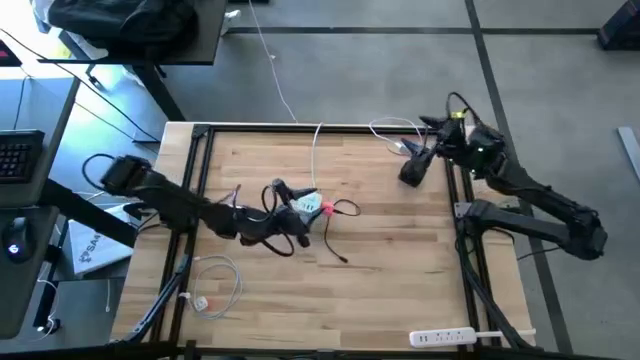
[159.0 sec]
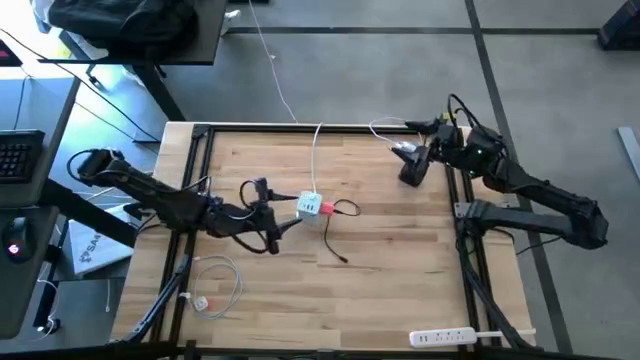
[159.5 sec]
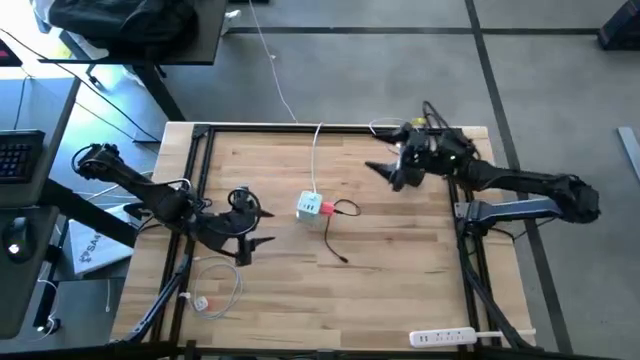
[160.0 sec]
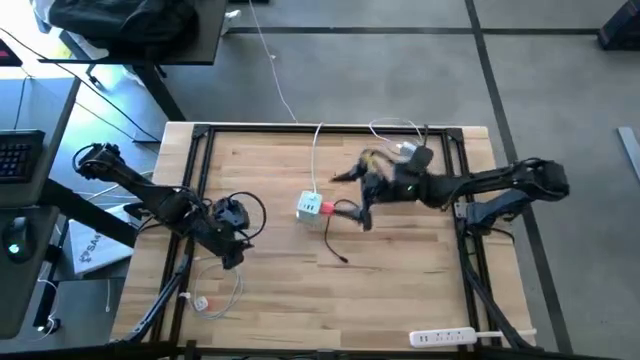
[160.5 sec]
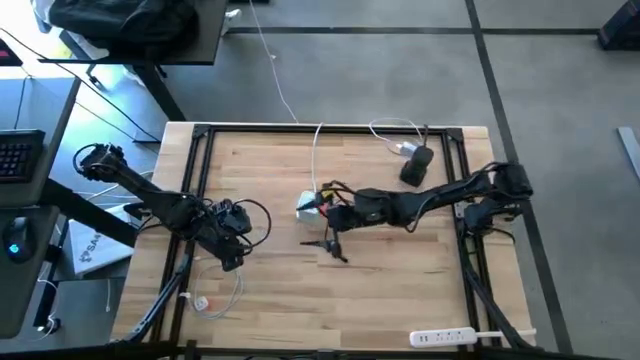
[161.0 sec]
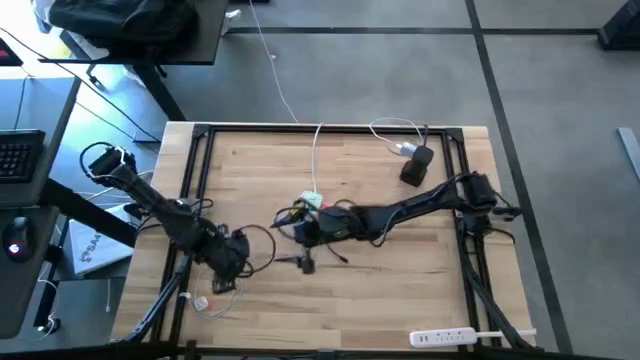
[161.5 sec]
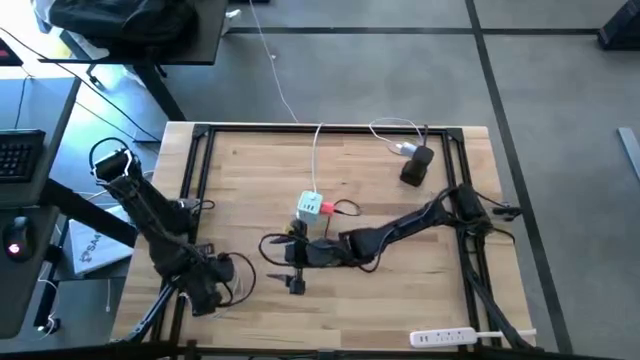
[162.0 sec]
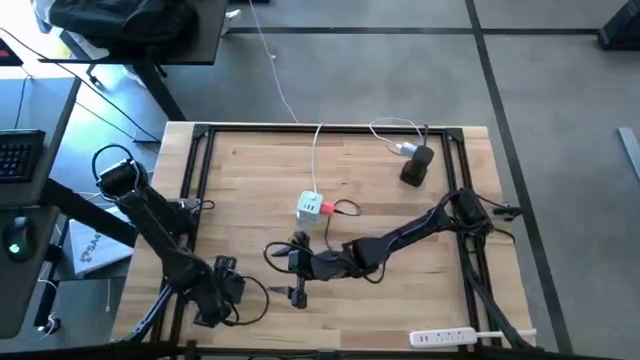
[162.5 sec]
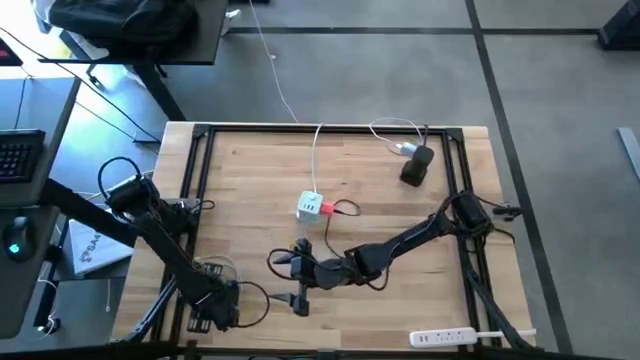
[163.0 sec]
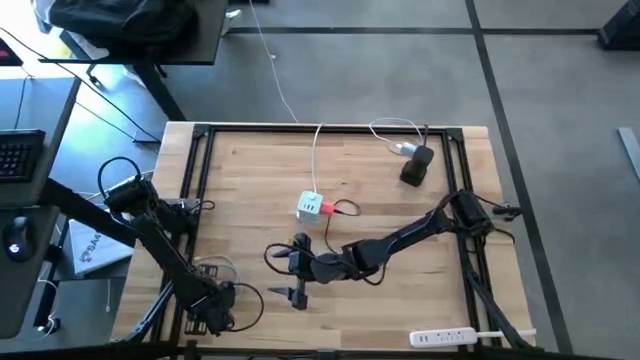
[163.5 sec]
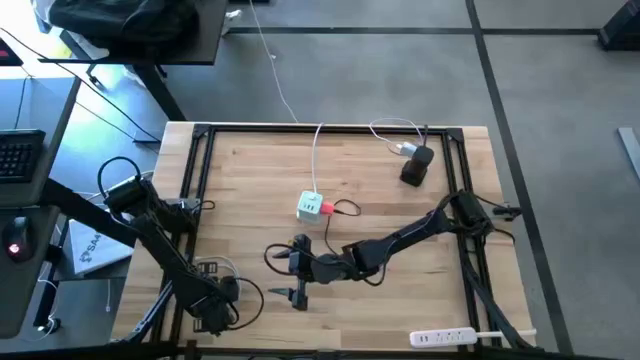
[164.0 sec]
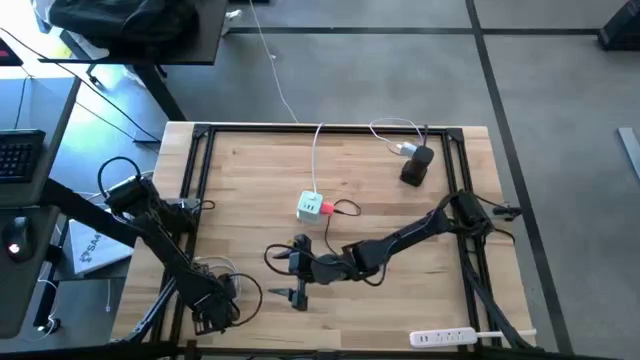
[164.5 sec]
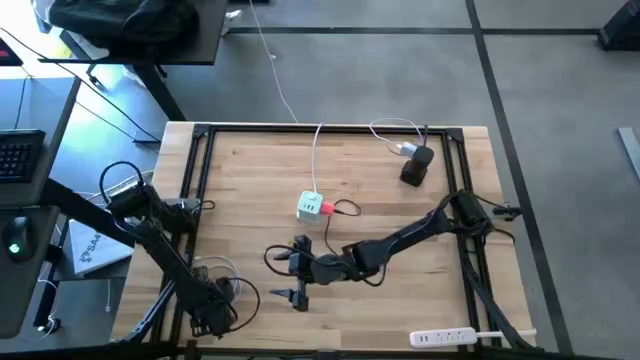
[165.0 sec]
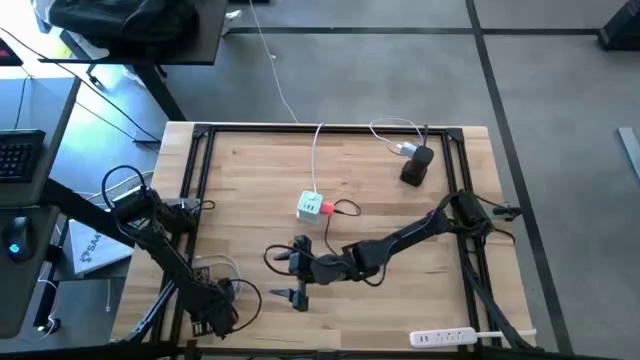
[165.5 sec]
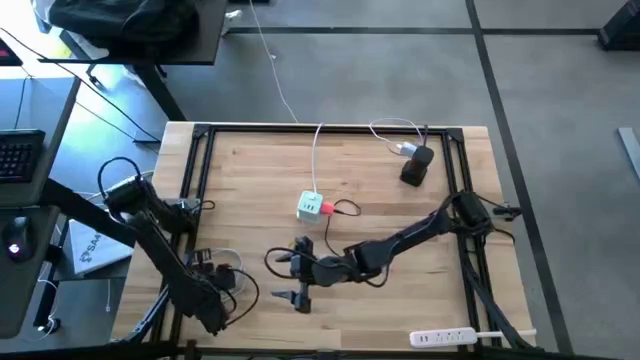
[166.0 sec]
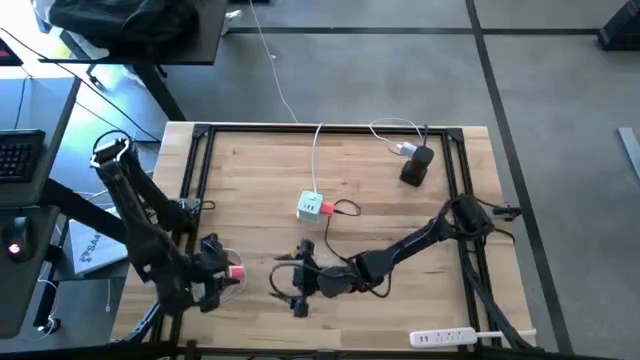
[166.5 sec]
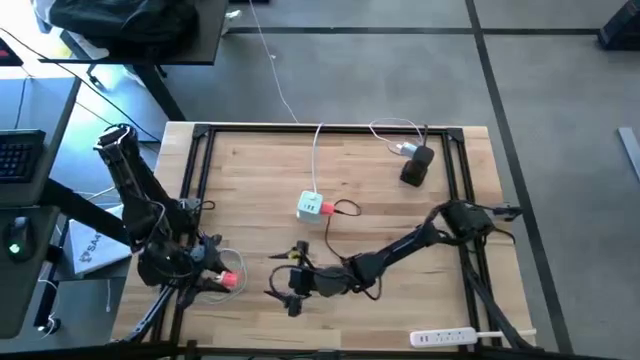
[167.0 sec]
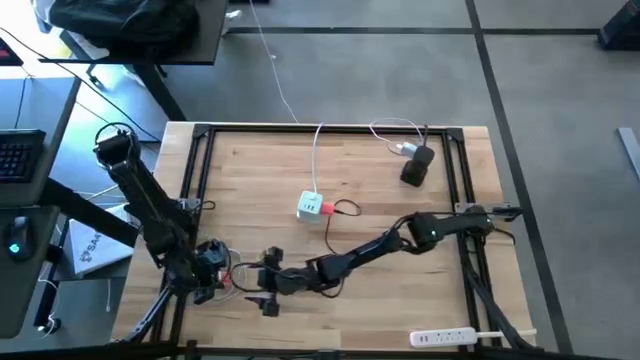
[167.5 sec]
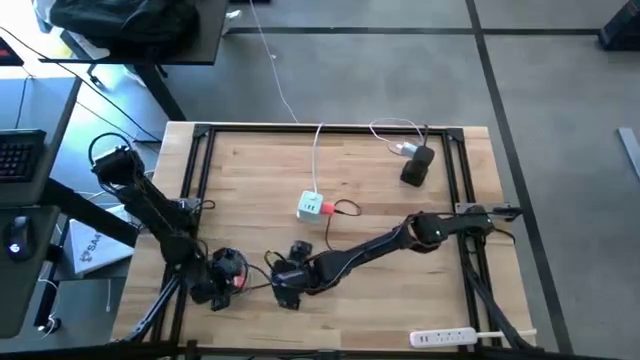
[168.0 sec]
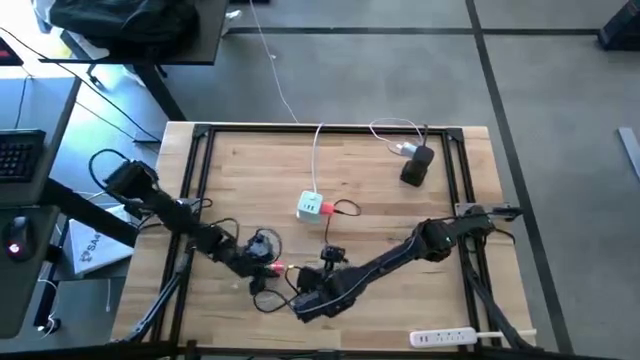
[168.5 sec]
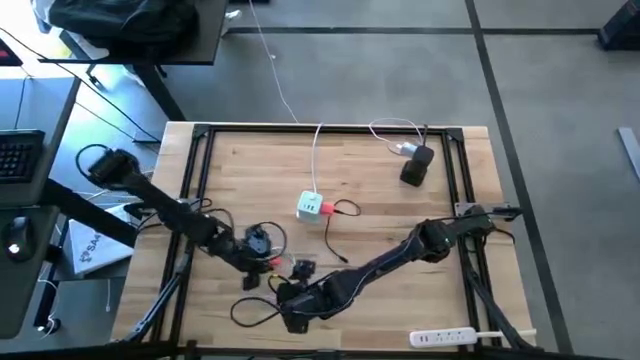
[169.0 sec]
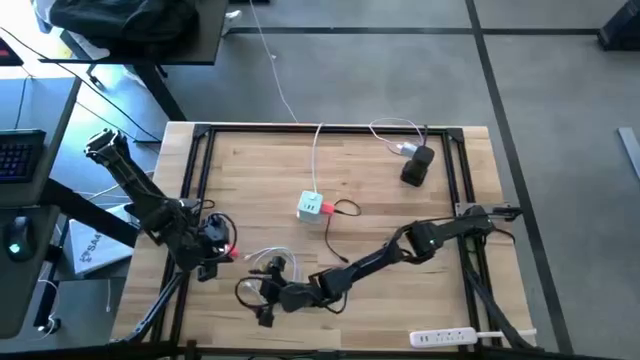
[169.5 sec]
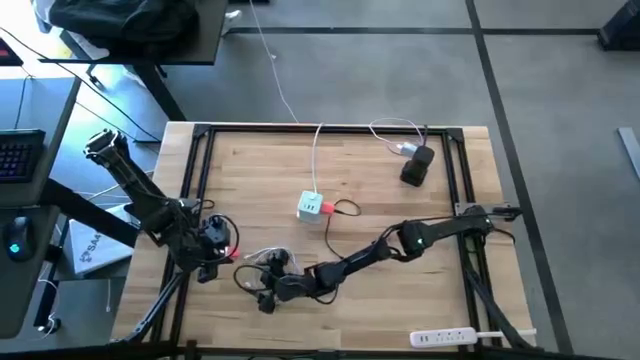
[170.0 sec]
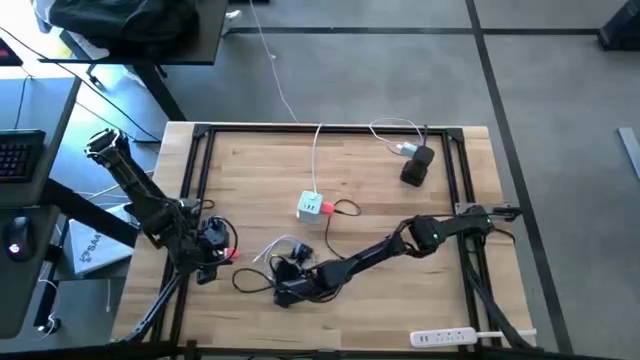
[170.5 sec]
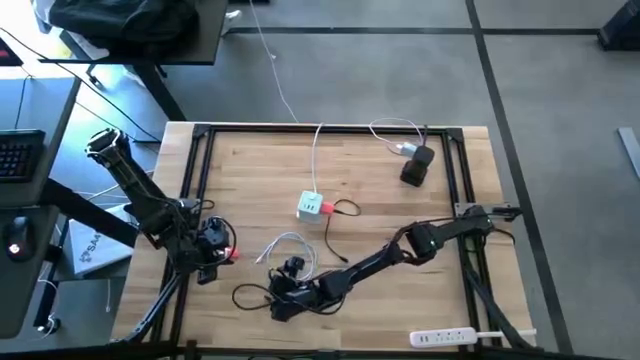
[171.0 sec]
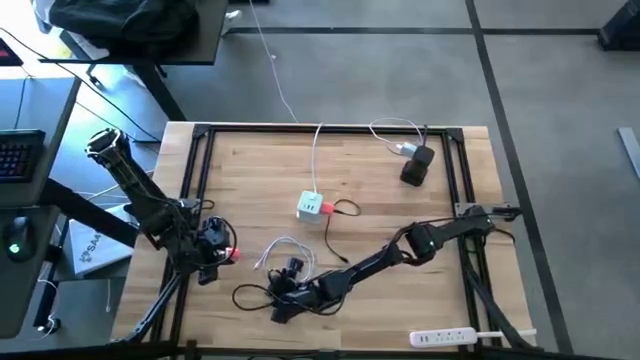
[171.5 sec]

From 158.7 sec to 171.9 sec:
Task: Insert USB
Insert the white charger cable into the pink charger adapter

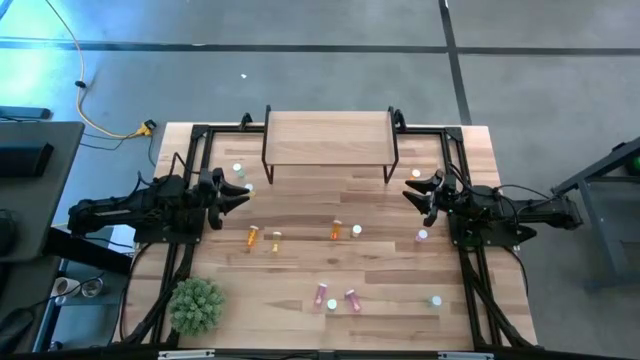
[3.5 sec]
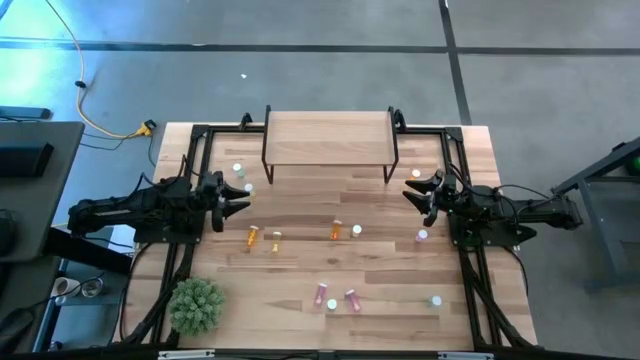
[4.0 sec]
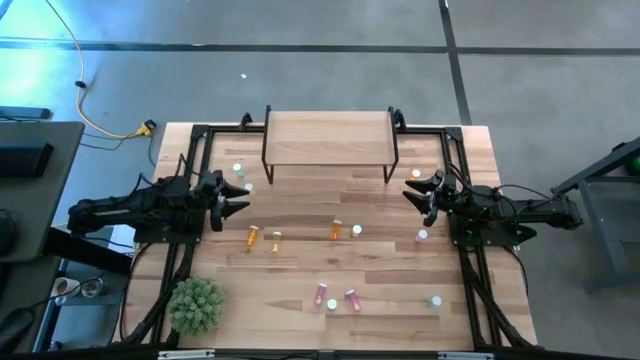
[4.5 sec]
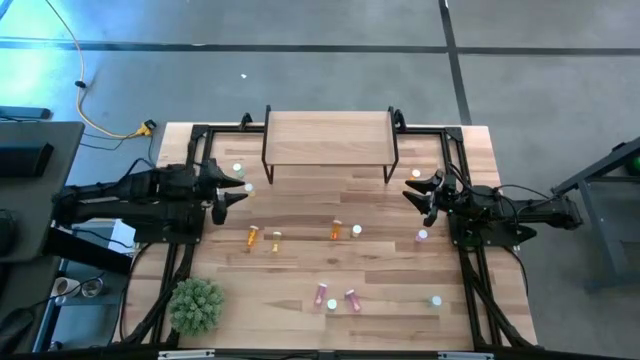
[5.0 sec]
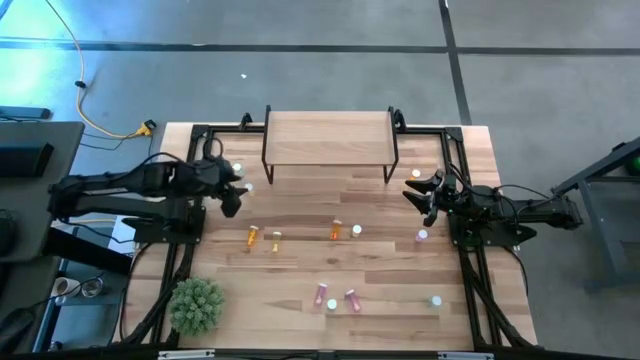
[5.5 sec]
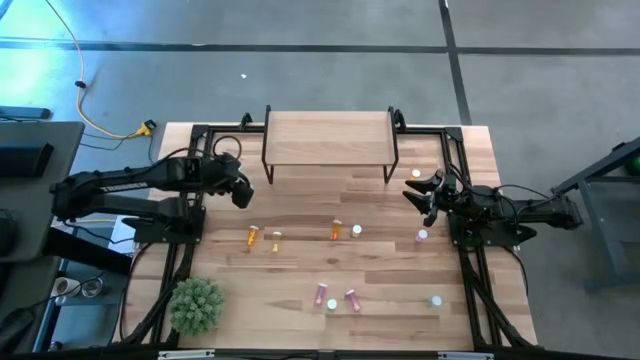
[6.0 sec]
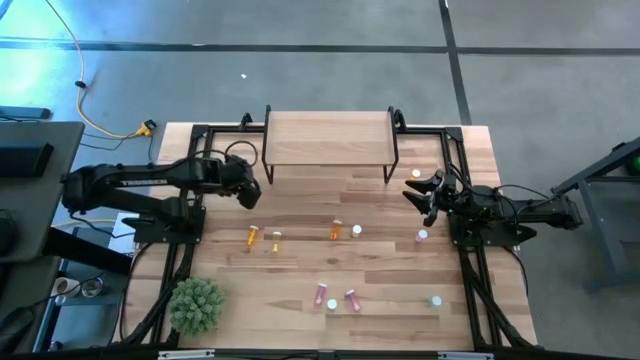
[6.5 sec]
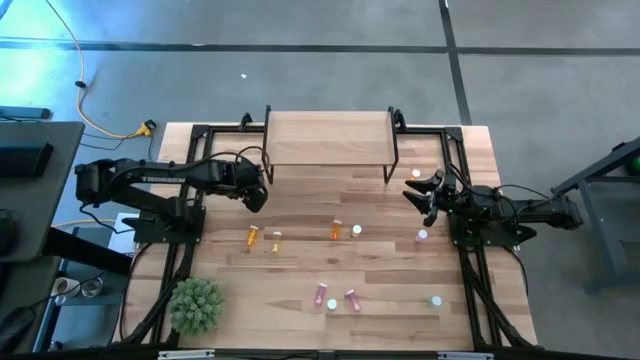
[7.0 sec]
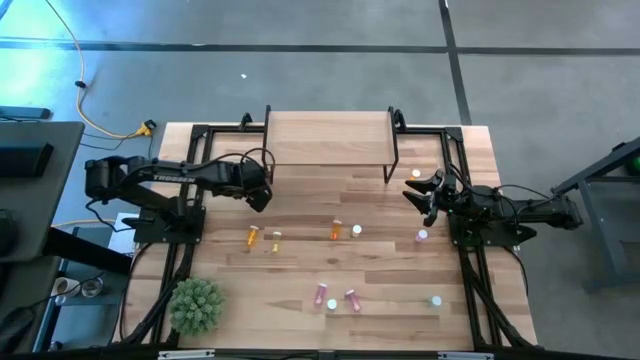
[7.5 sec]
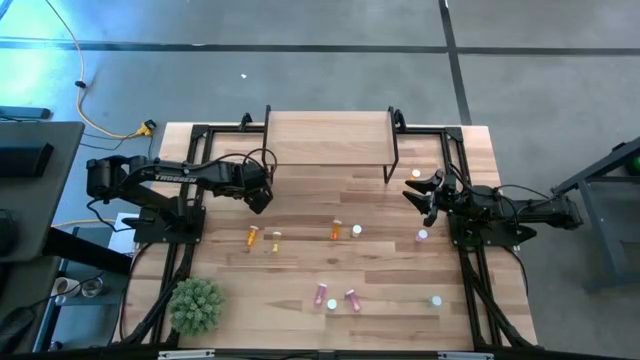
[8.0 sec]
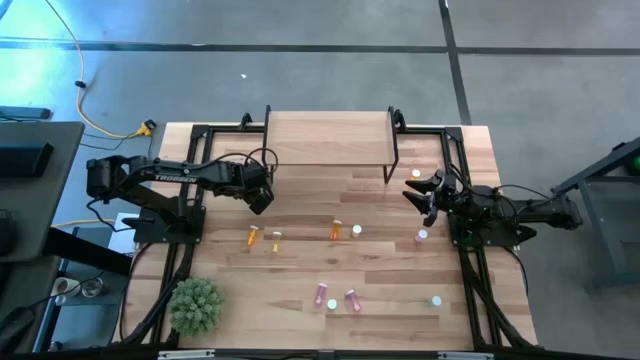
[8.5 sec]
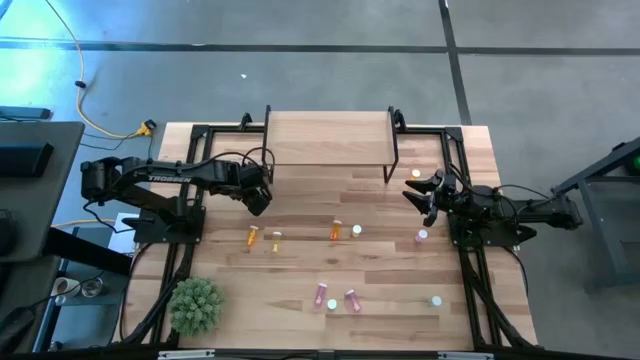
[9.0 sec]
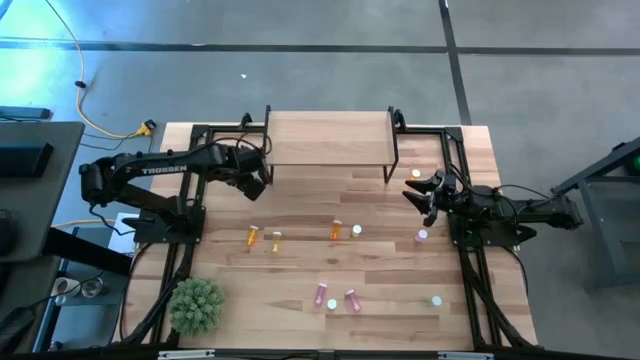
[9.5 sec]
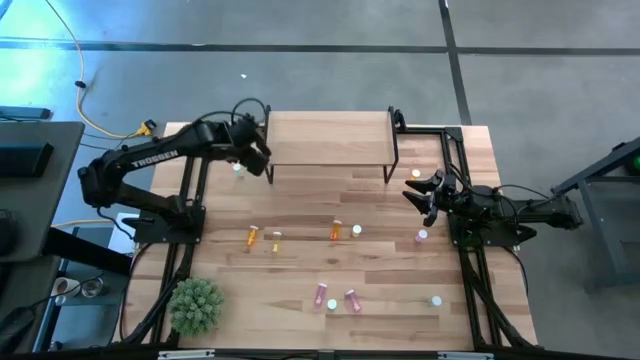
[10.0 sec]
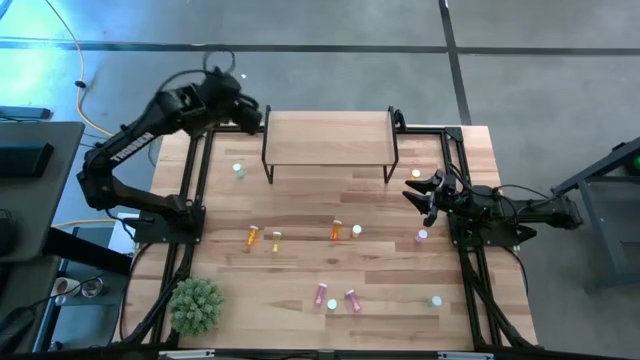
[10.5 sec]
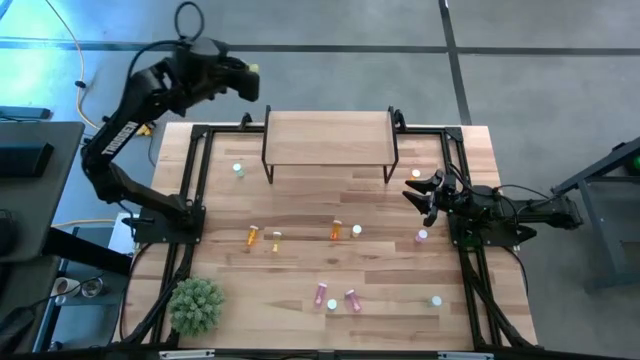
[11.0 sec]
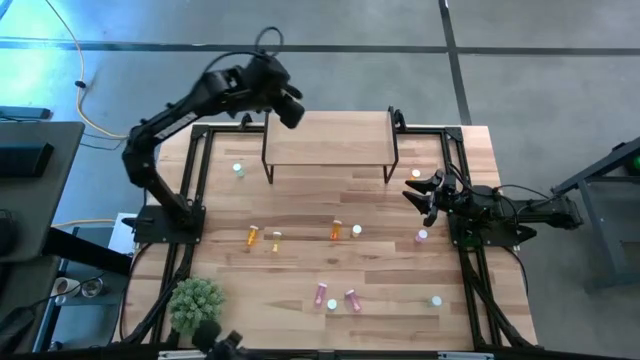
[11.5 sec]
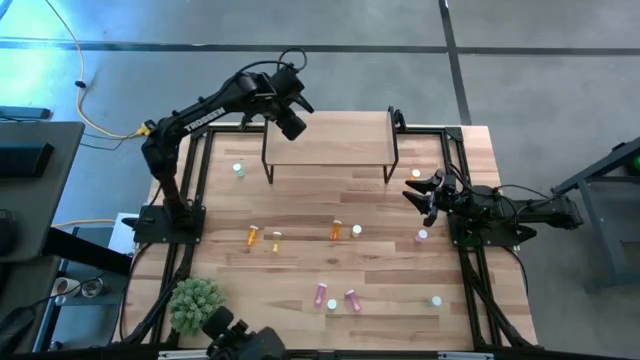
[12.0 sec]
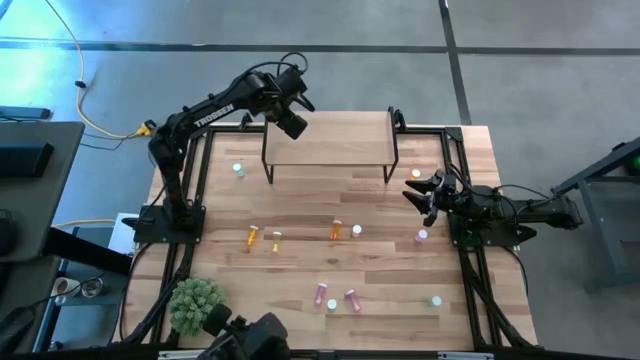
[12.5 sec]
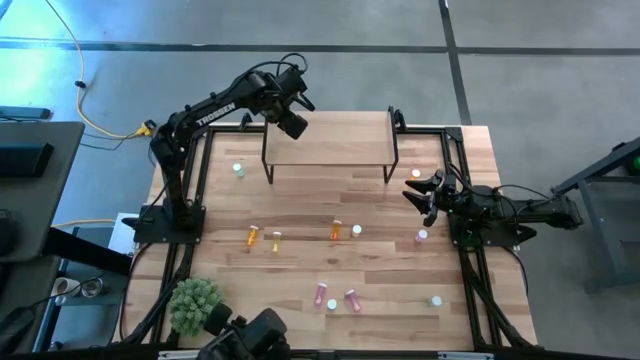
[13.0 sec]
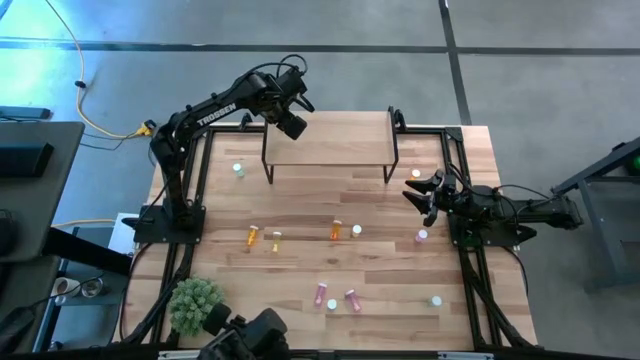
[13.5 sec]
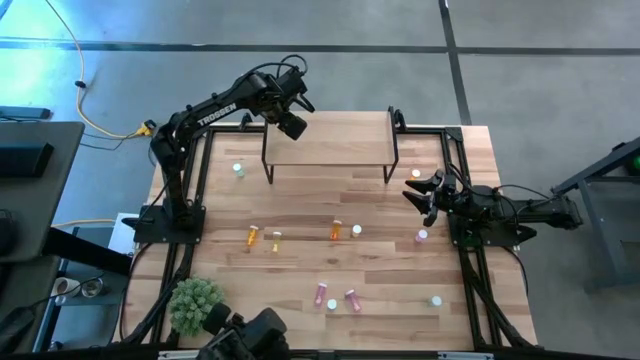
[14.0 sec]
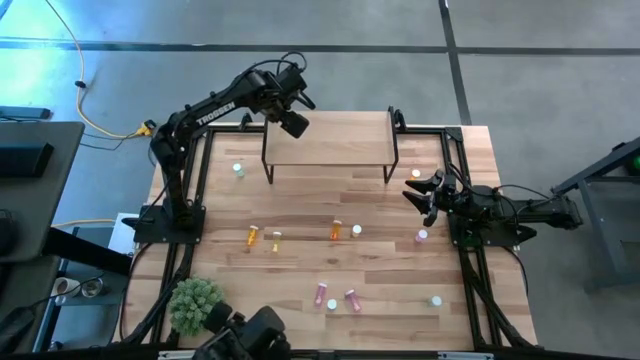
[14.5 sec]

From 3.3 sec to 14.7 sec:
Task: Pick and place medicine bottles onto shelf by color
Put the top yellow pill bottle on the shelf
